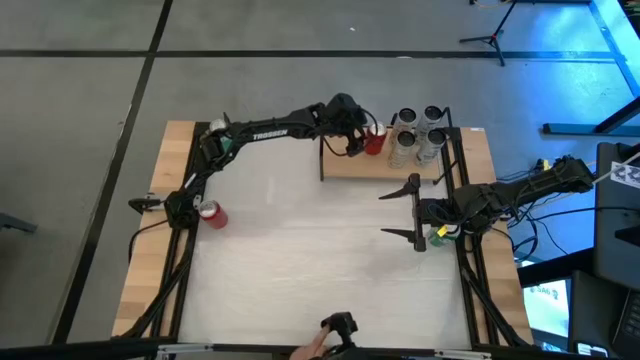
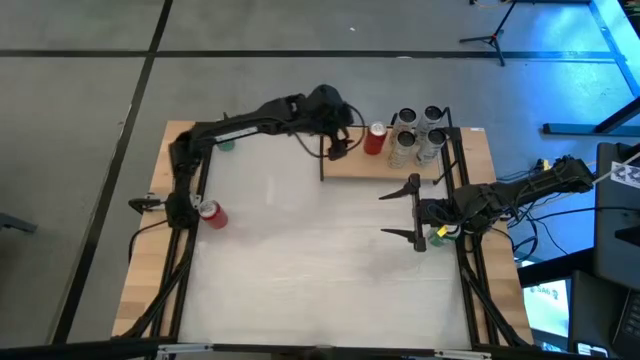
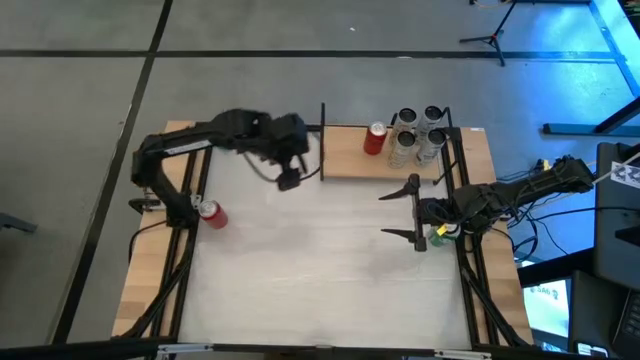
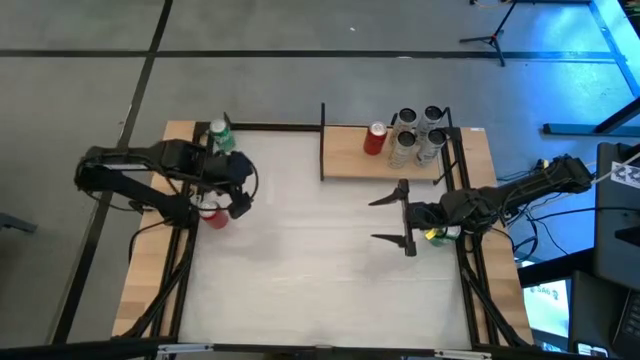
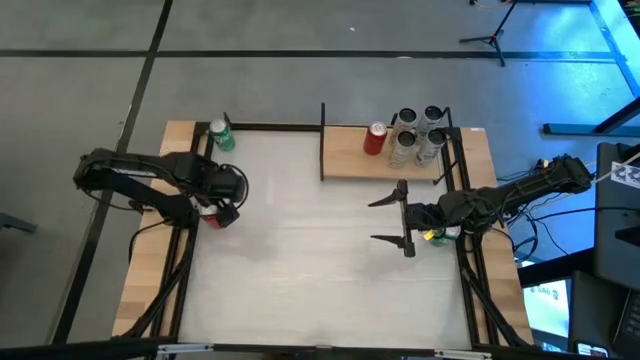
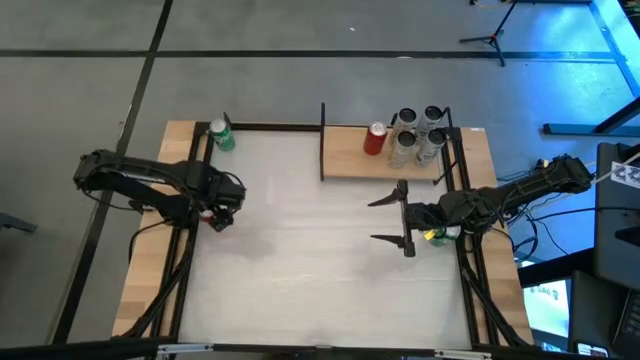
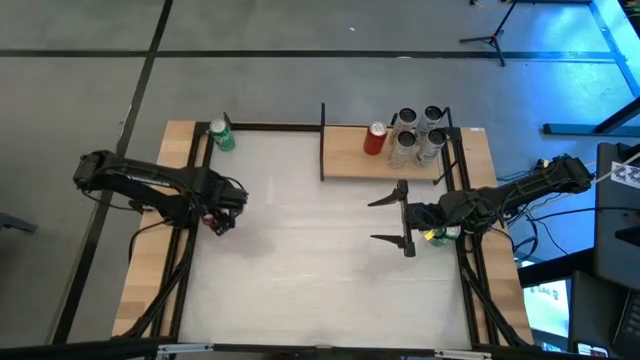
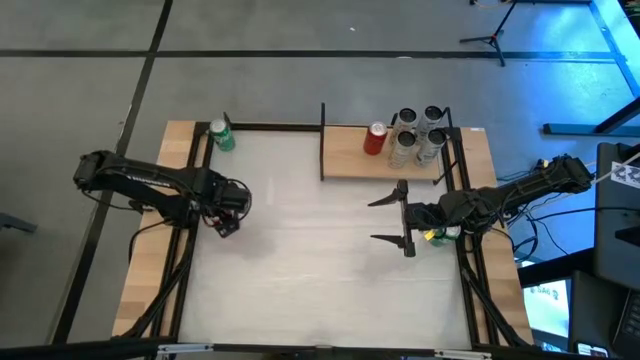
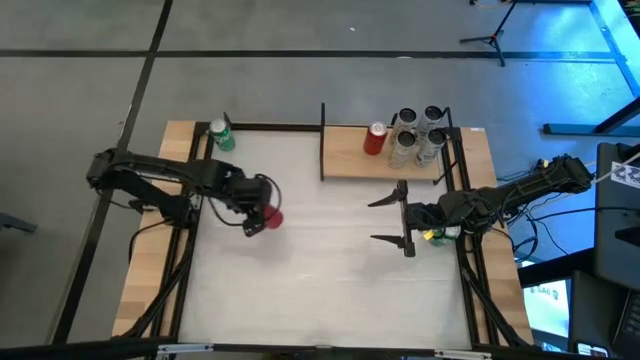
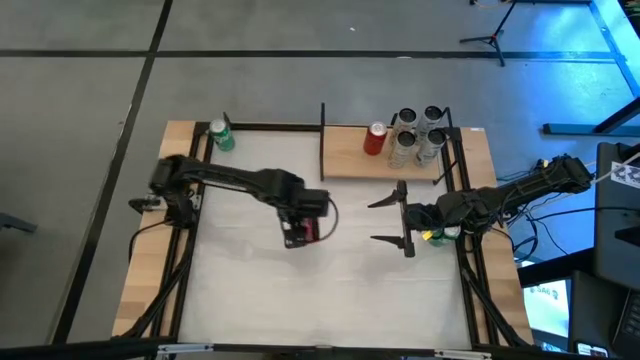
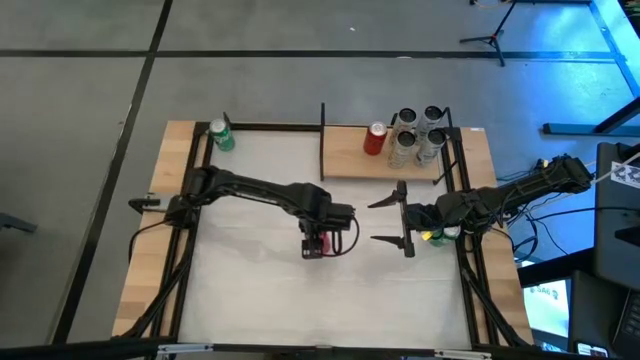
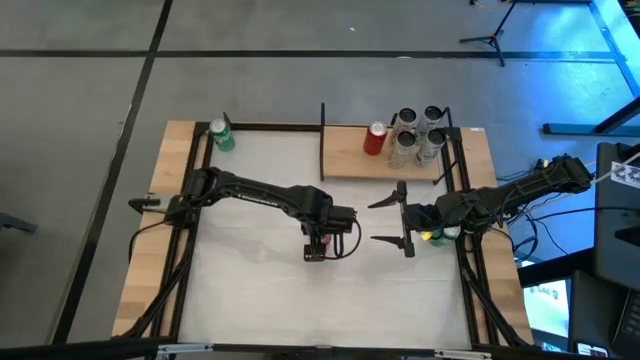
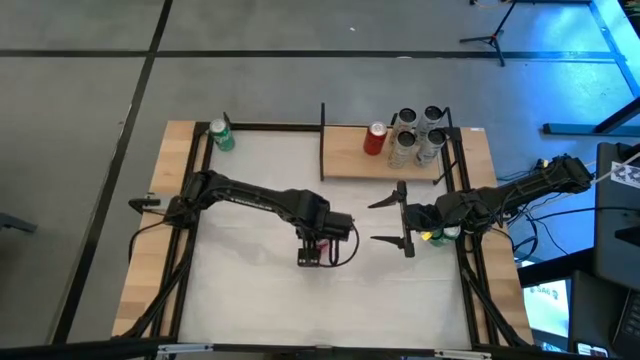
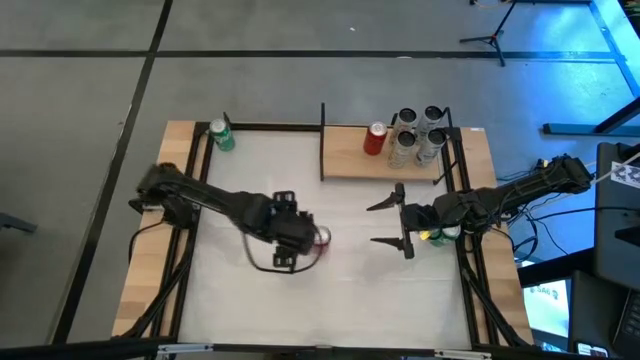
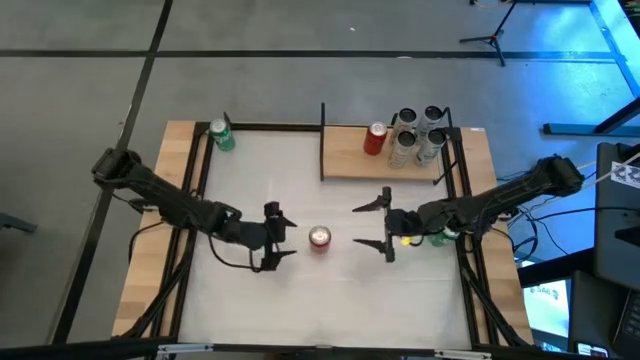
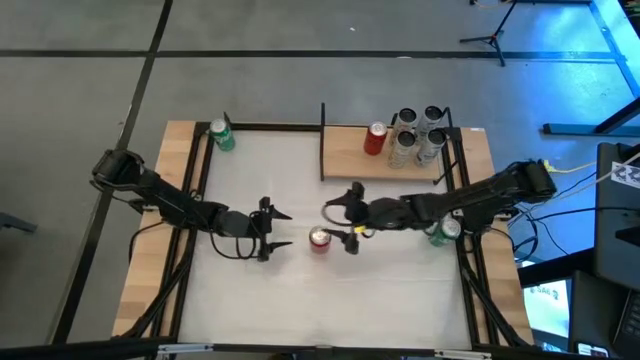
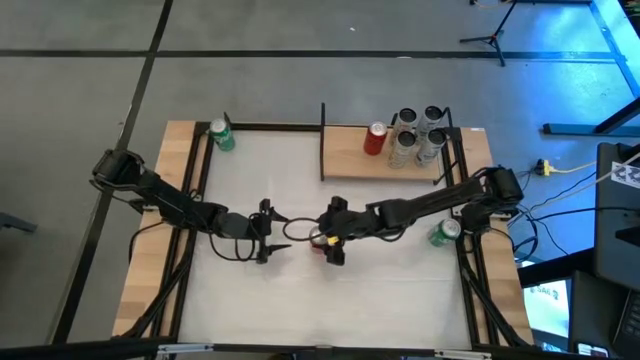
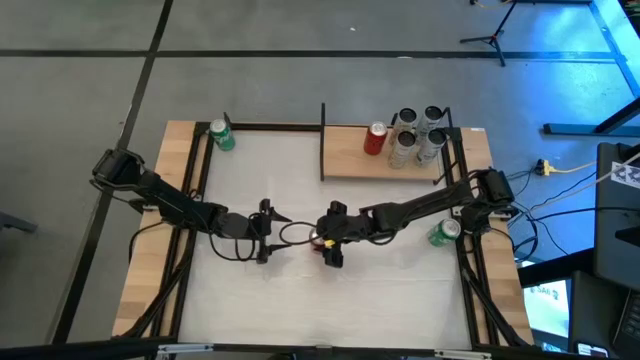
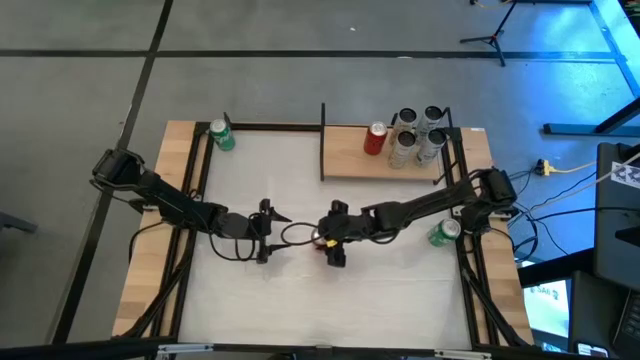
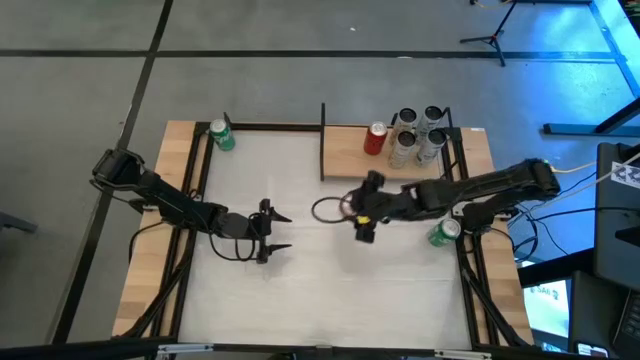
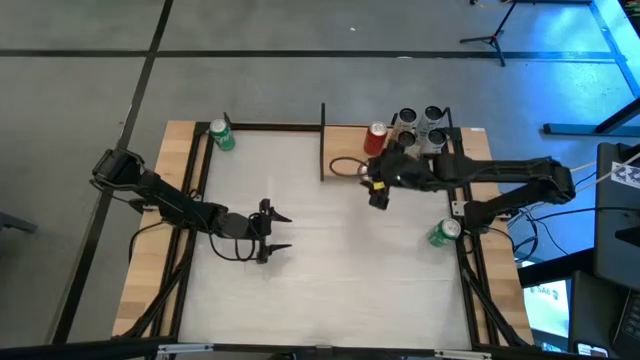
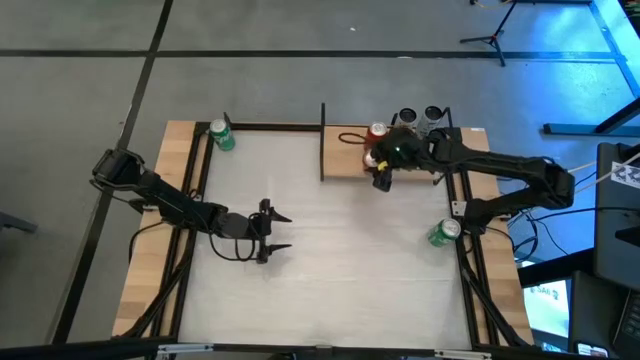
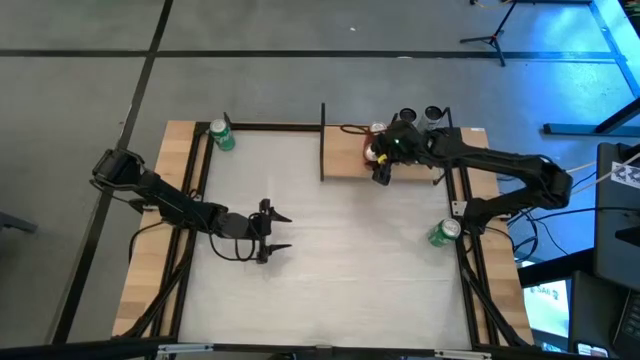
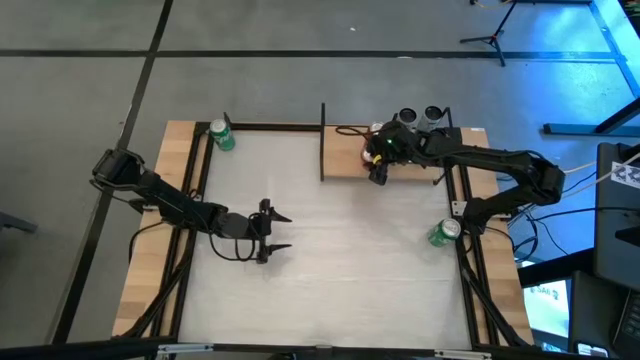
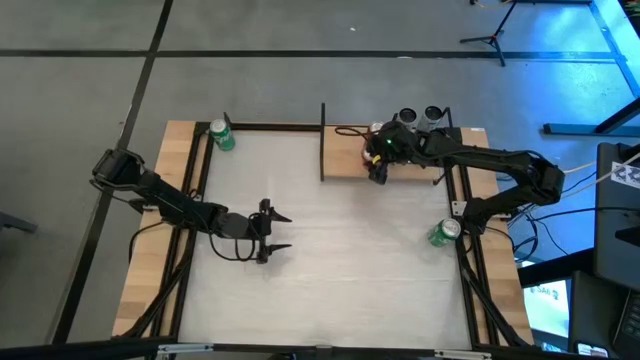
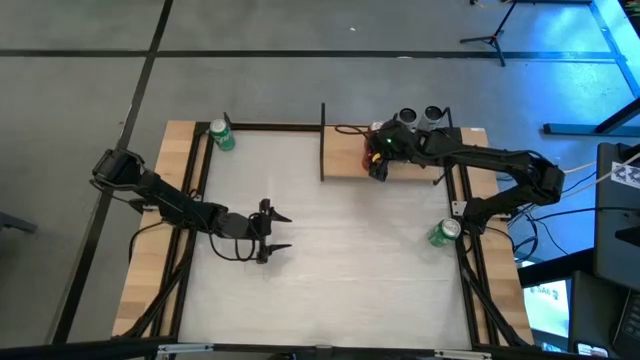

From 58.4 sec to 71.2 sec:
Task: Place canned beverage on shelf
Put the red soda can on the shelf aligned with the other red soda can

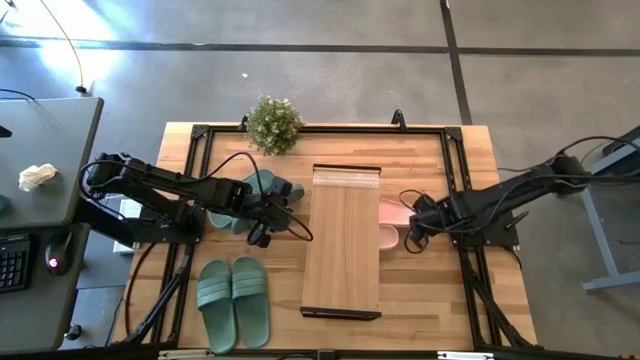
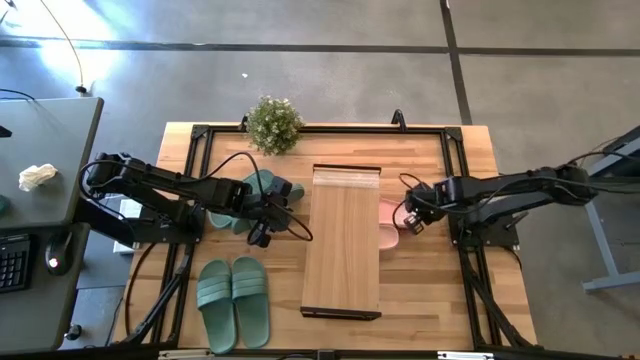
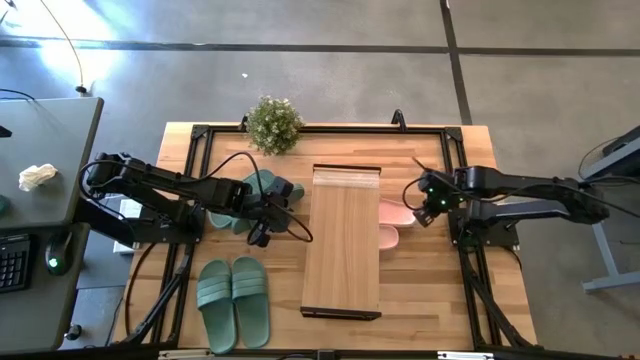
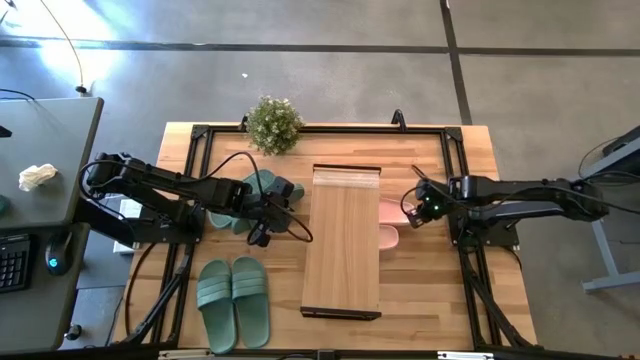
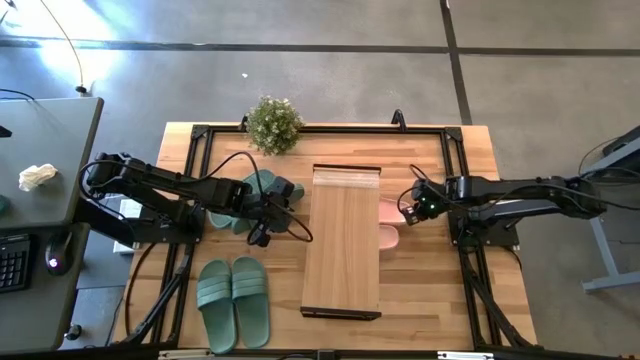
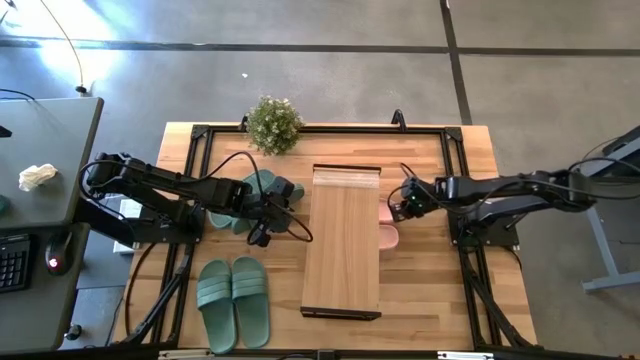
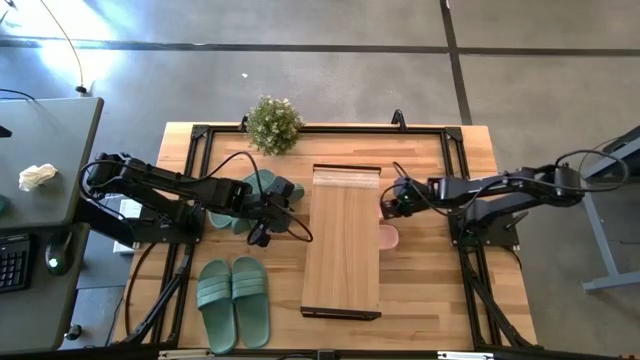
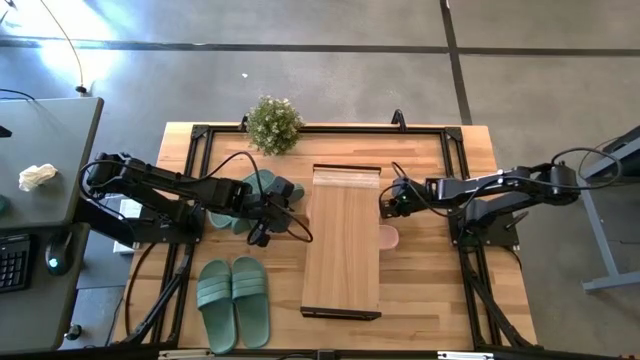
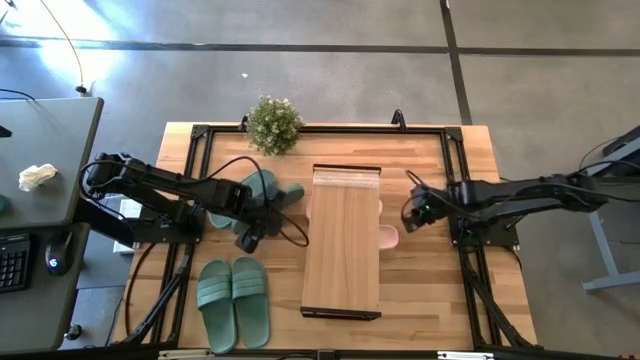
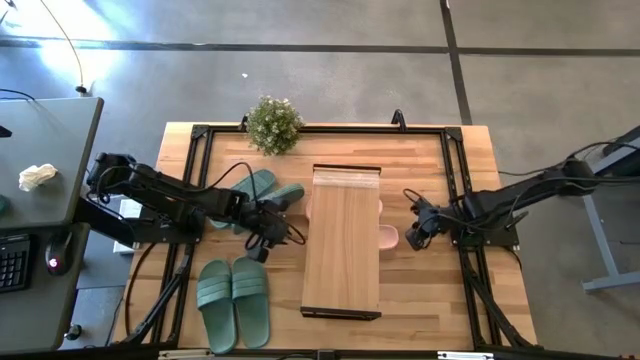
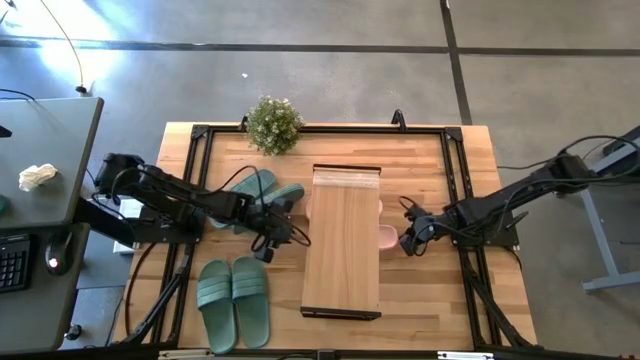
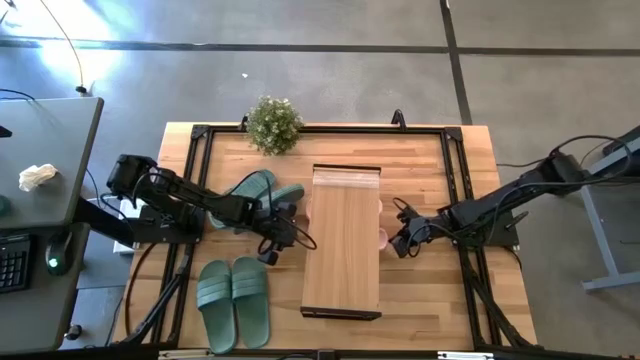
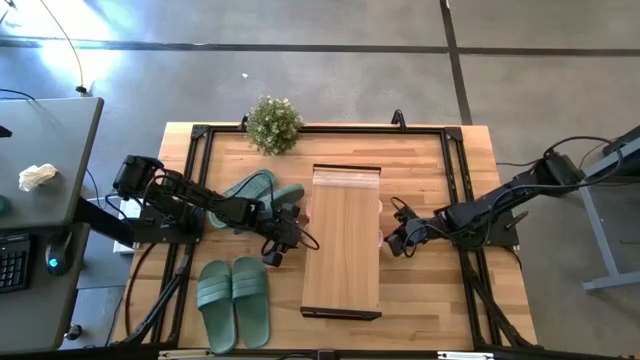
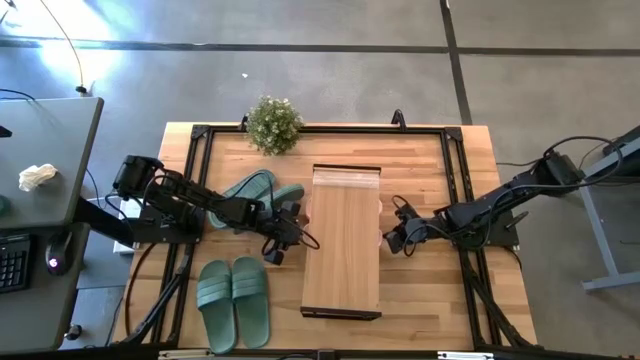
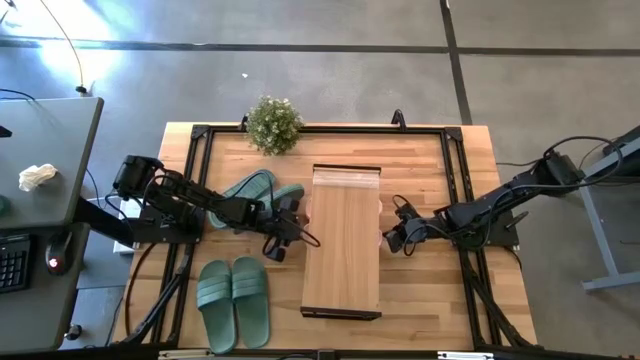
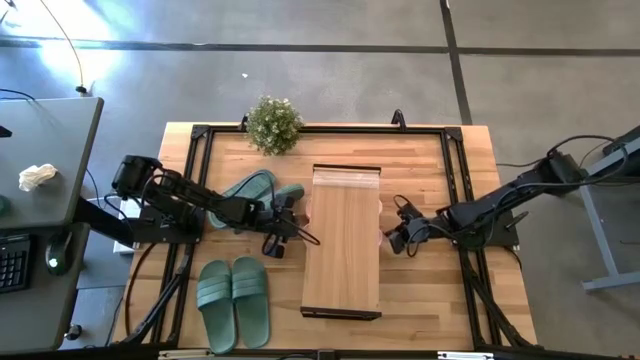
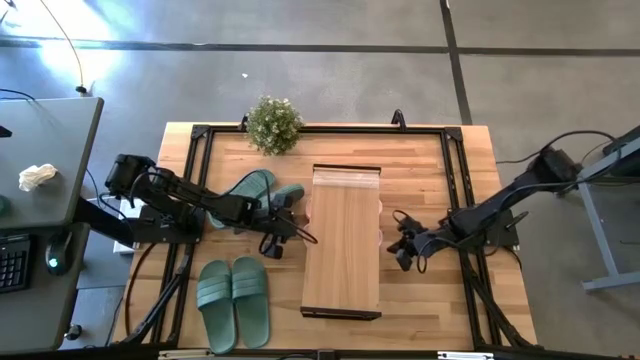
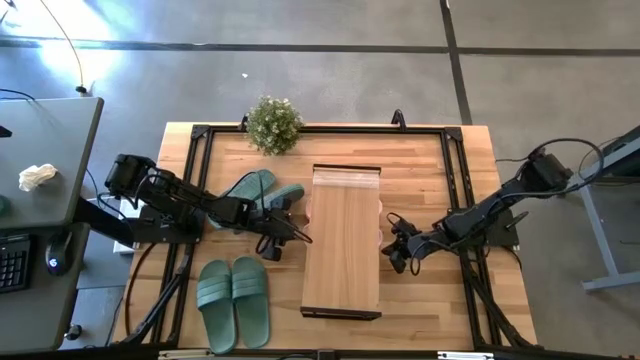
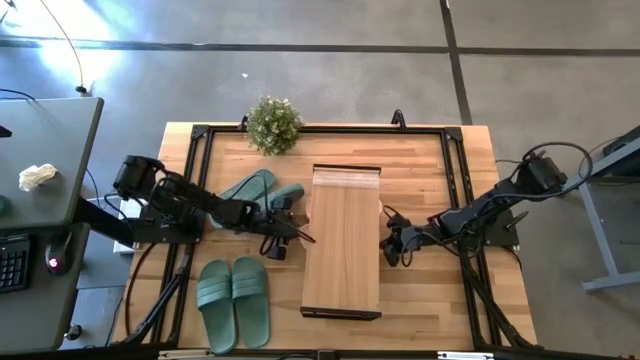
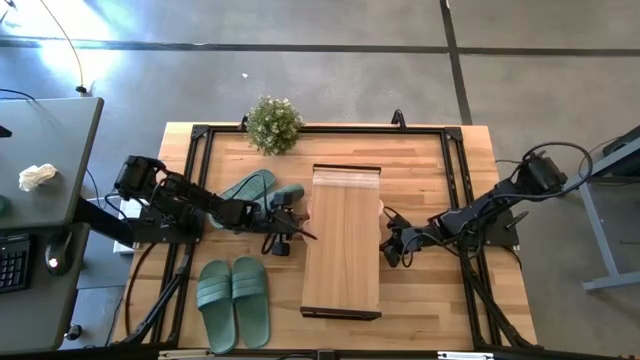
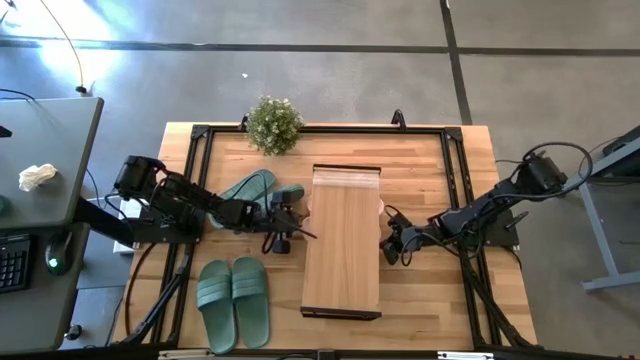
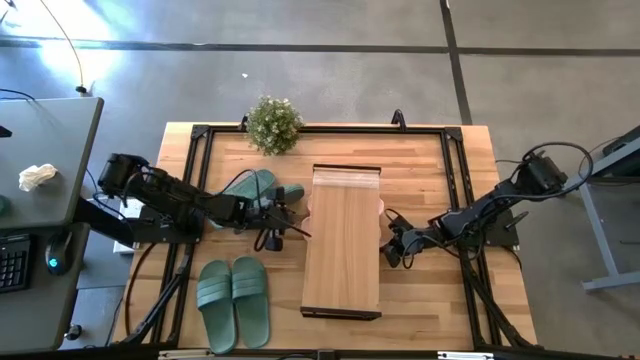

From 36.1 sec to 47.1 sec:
Task: Pick and place slides into the shelf
Adjust the slippers under the shelf
